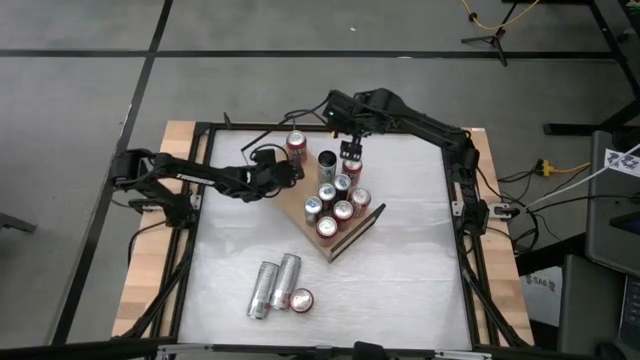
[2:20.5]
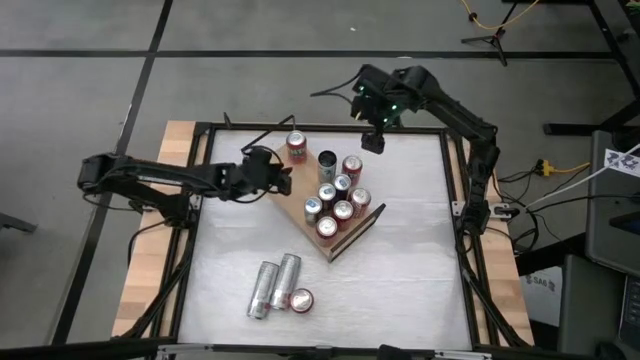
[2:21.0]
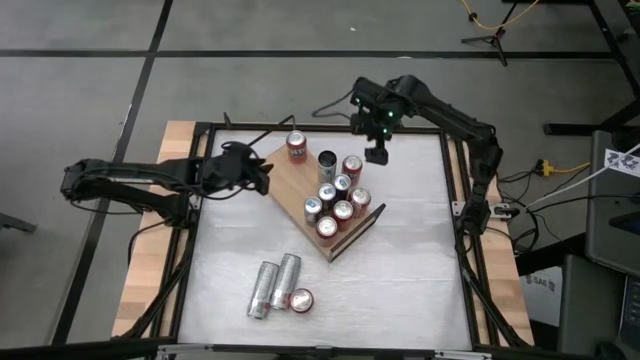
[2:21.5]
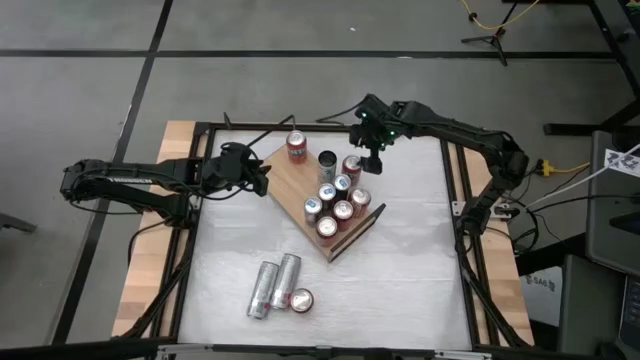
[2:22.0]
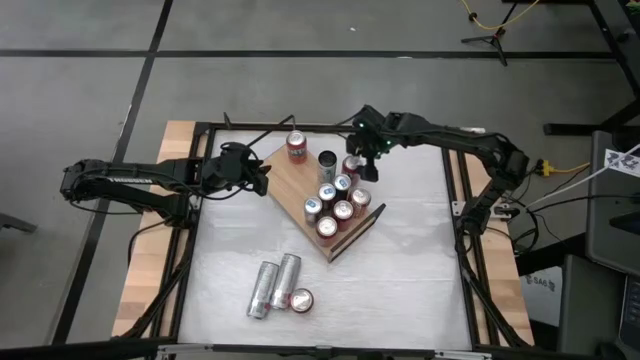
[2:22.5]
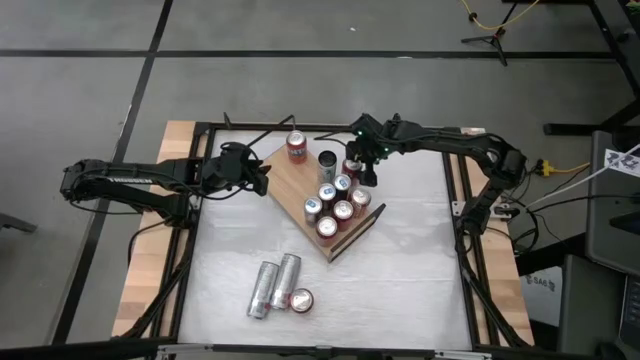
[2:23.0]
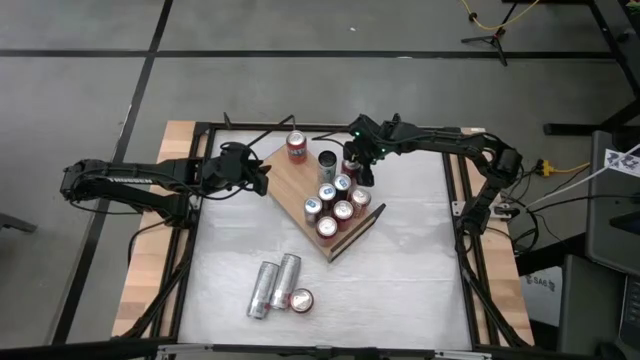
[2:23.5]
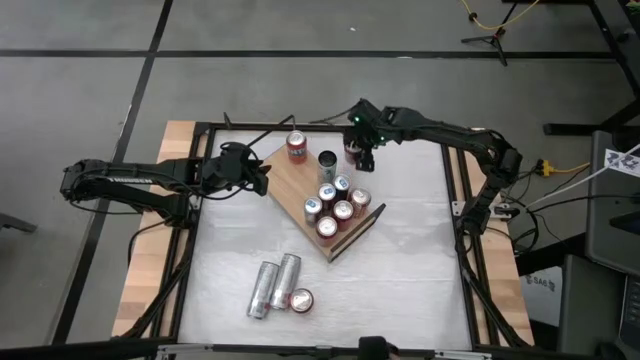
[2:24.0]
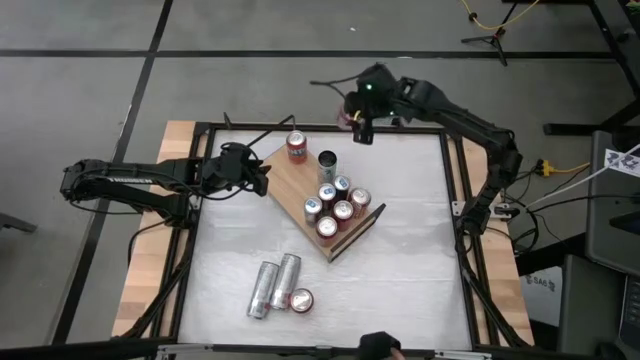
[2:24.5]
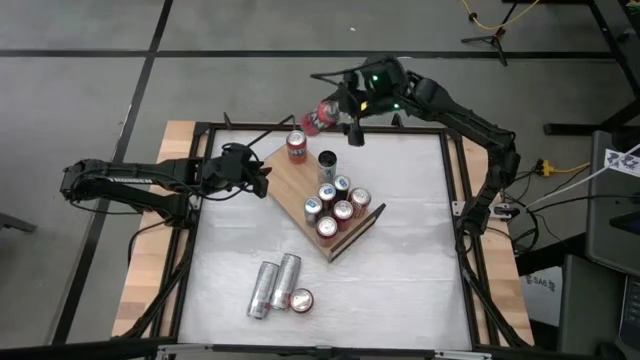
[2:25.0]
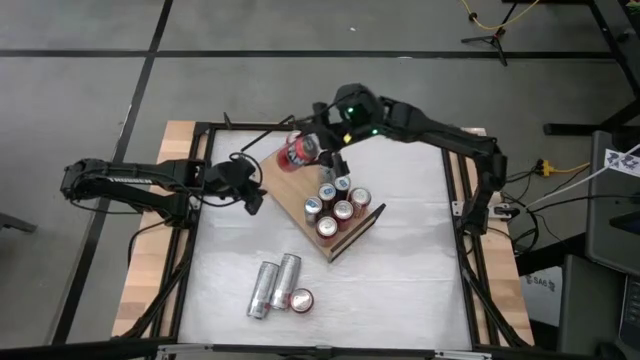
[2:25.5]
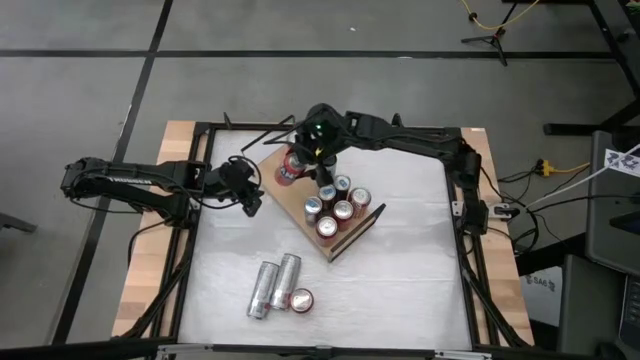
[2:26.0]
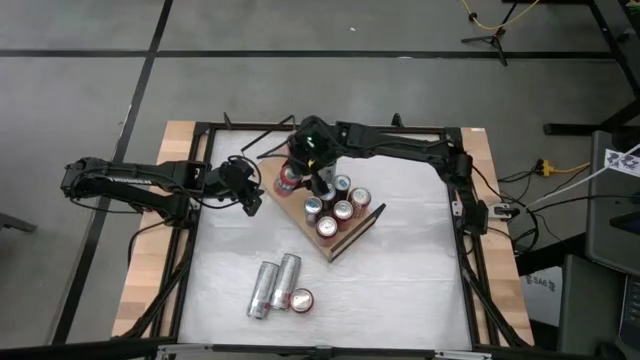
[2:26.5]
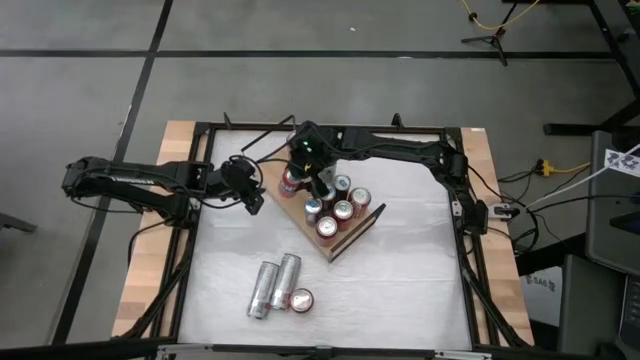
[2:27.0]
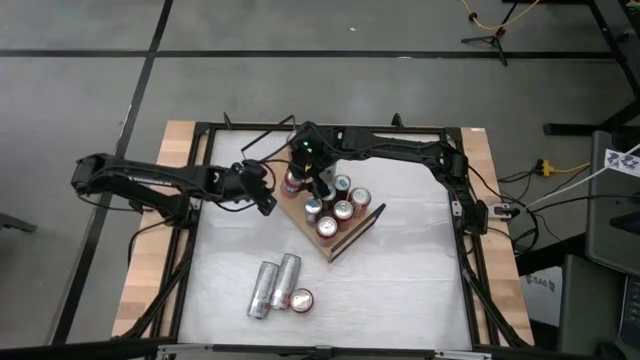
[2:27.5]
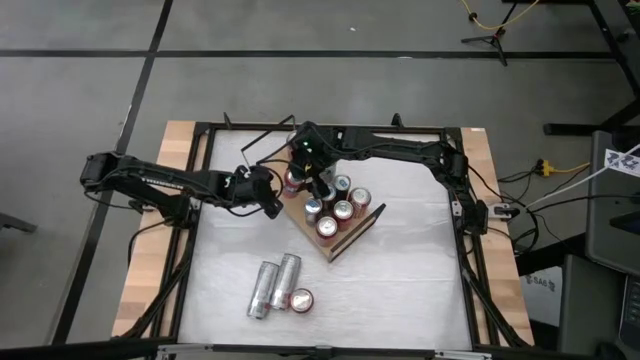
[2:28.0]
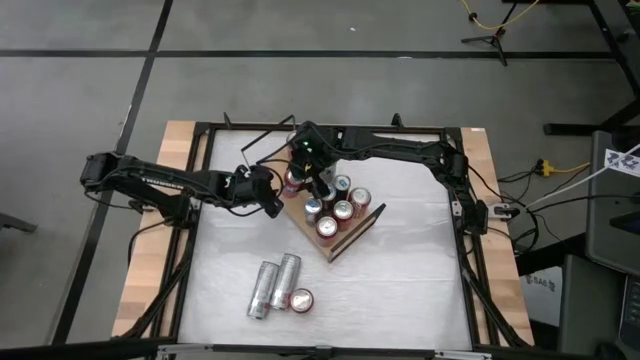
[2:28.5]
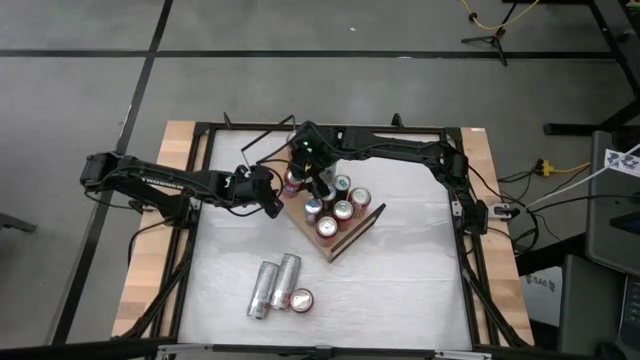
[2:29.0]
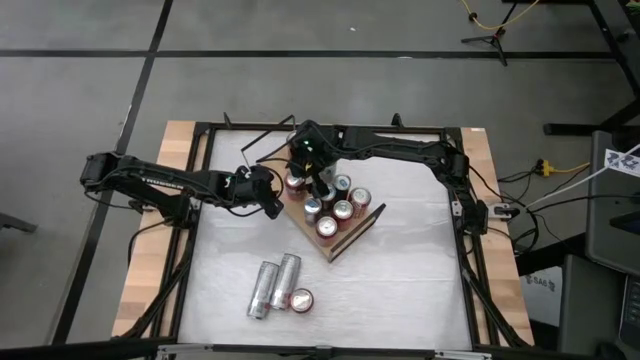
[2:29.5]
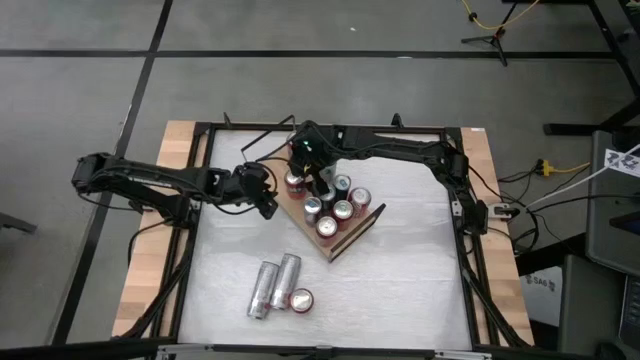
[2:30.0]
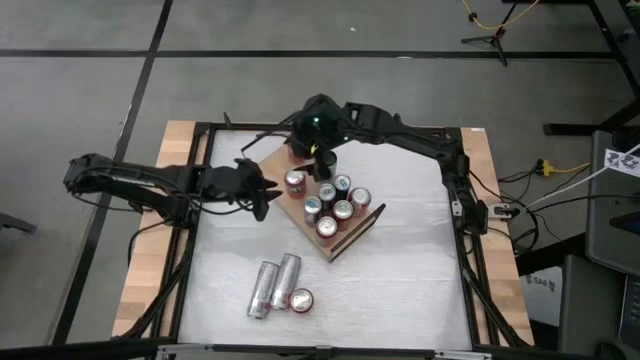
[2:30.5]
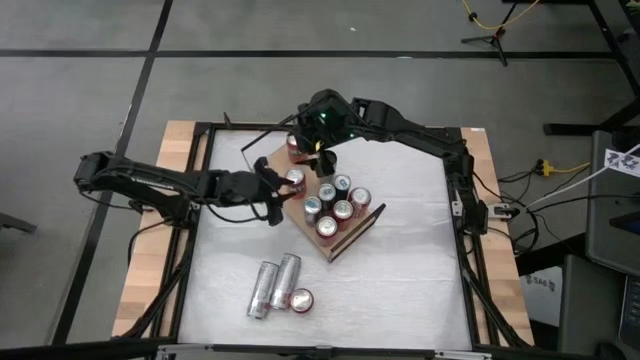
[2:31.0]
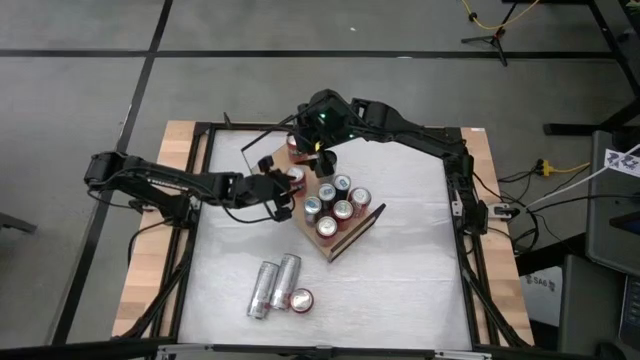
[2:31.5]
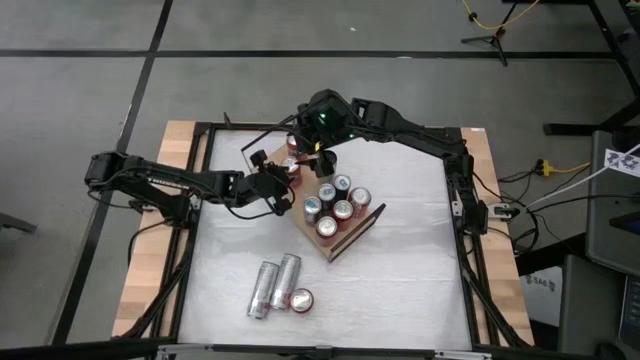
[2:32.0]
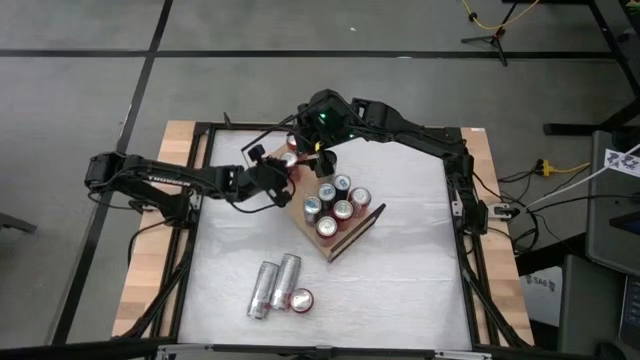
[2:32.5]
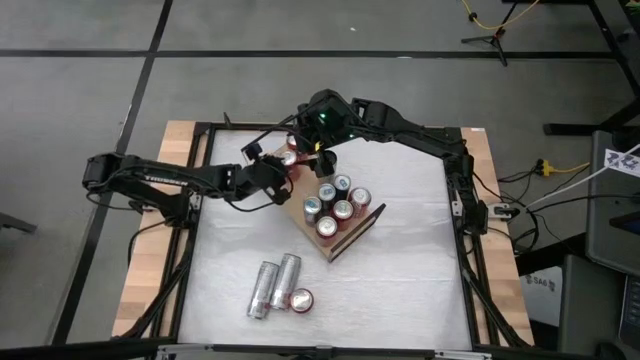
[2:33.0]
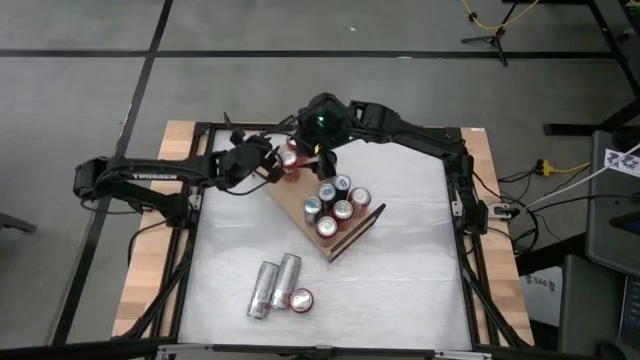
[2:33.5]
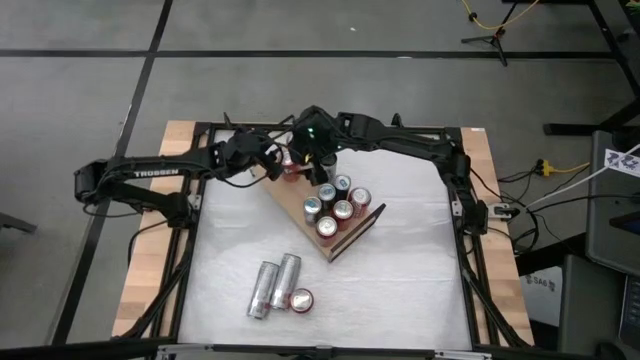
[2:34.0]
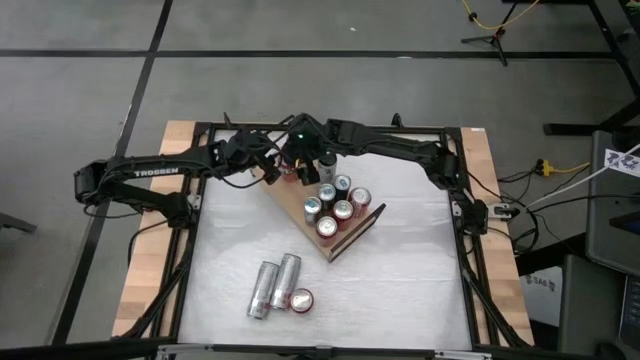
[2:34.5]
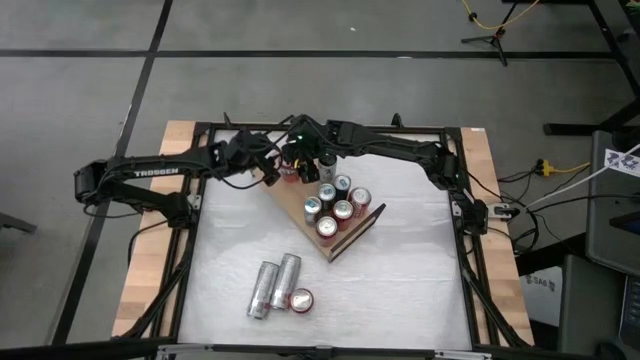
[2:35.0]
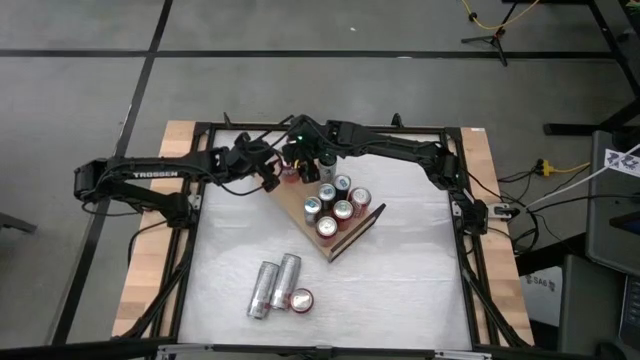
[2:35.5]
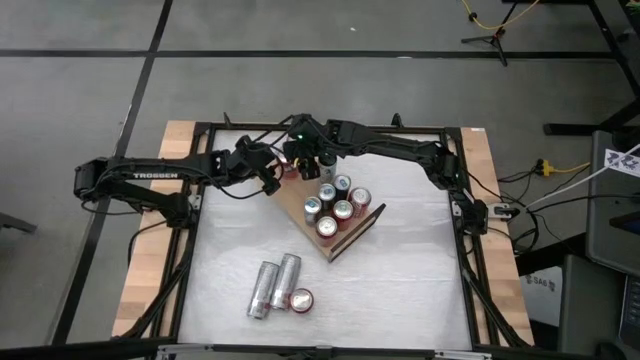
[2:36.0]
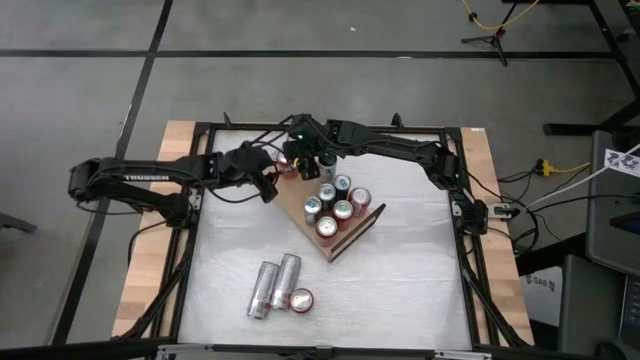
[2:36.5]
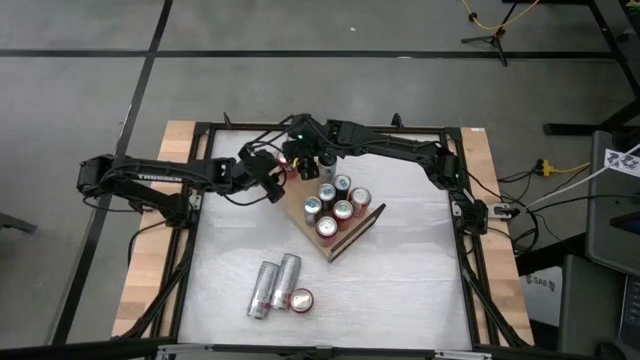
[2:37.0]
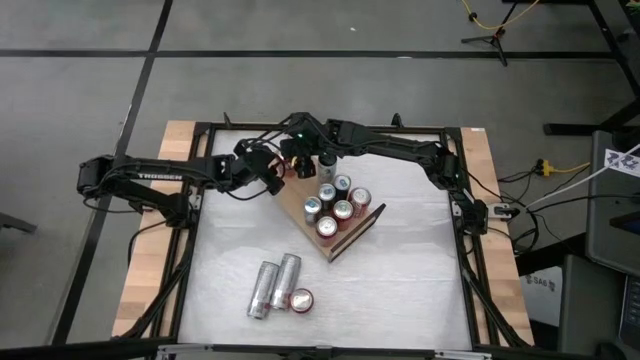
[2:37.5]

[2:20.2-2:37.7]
Task: Place canned beverage on shelf
Put the top red soda can on the shelf aligned with the other red soda can

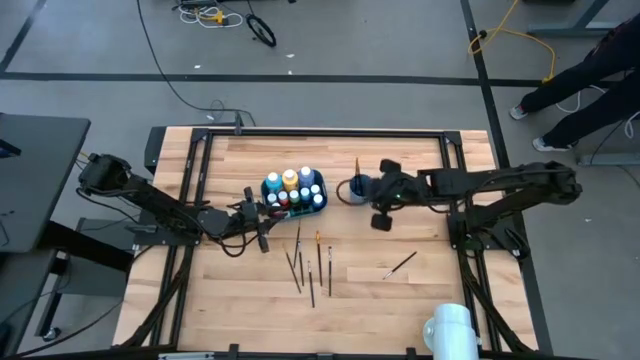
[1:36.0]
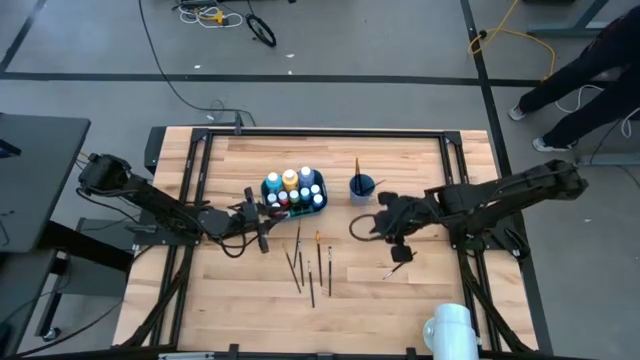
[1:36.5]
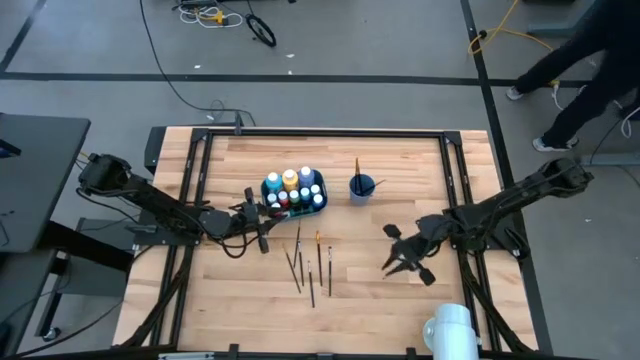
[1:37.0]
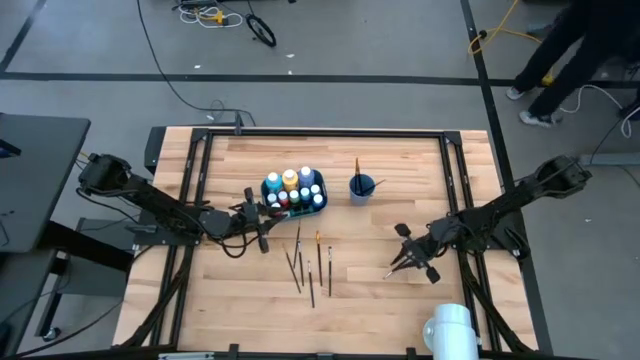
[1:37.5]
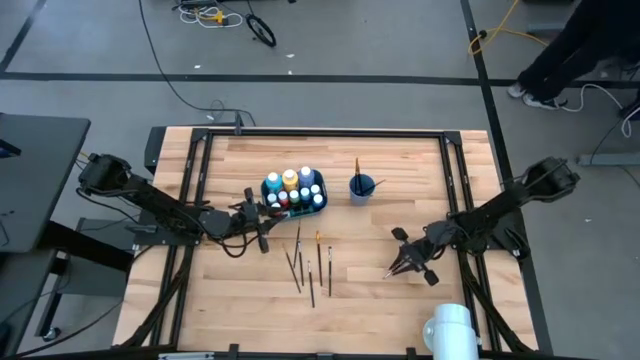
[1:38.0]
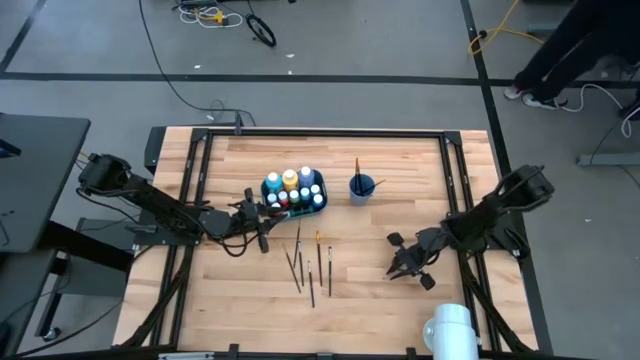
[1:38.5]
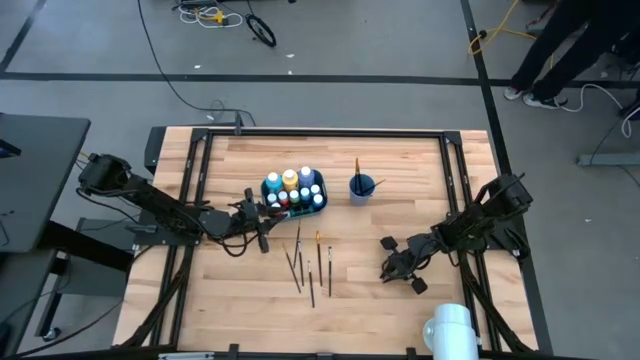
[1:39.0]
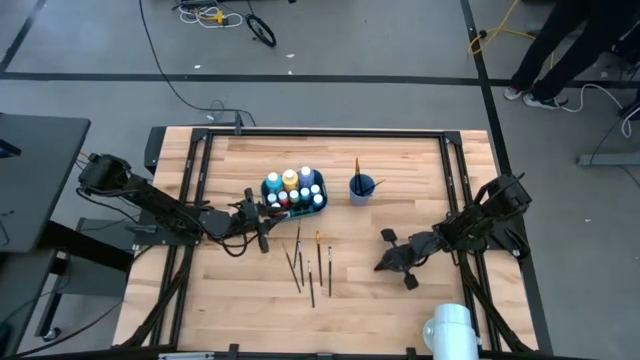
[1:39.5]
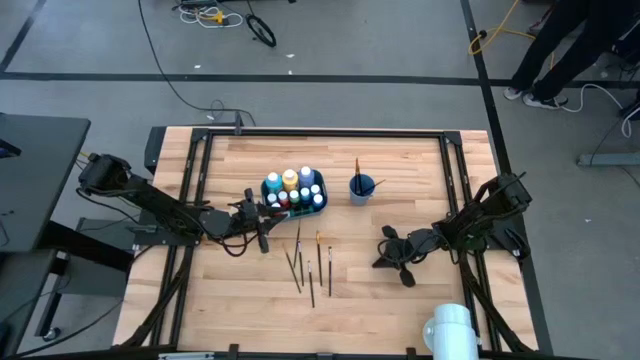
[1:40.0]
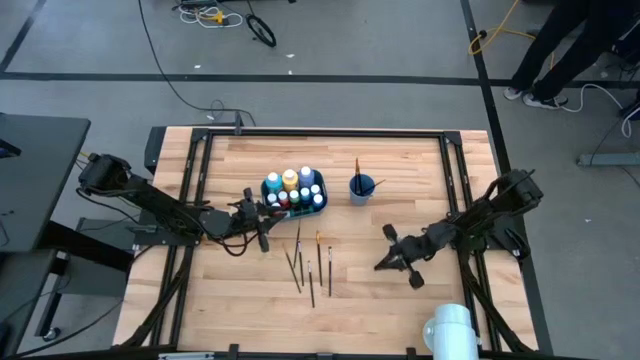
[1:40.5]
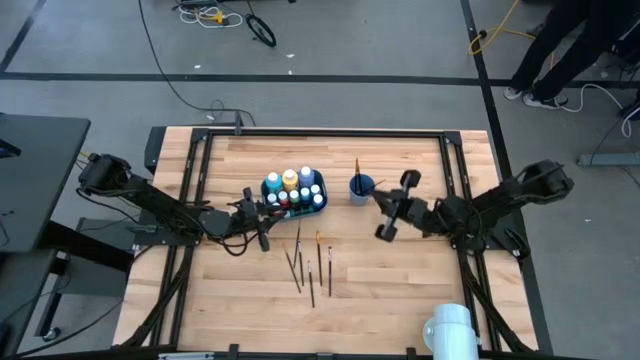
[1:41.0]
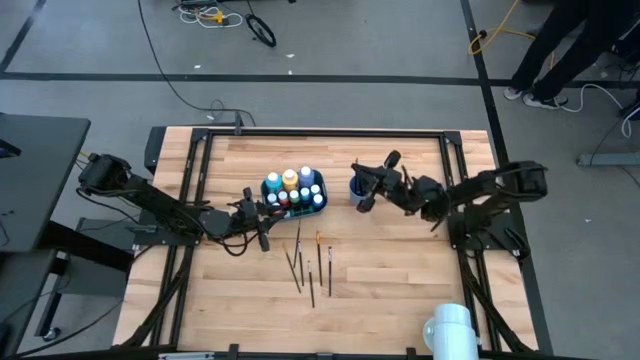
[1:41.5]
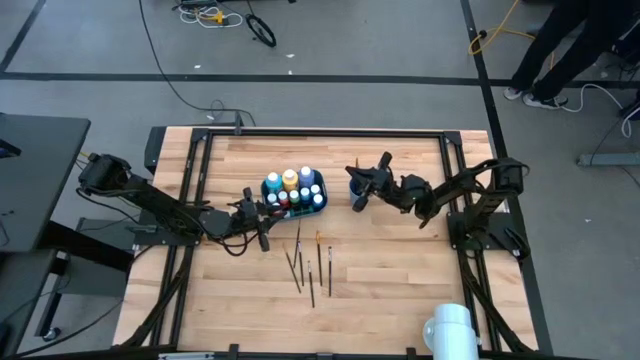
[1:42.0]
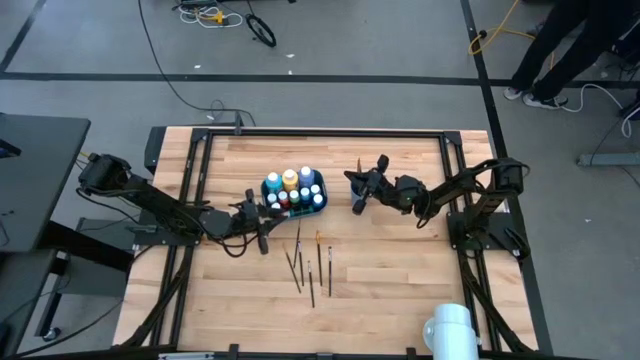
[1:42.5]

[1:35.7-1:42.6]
Task: Pick & Place Paint Supplies
Put the silver paint brush into the blue cup
